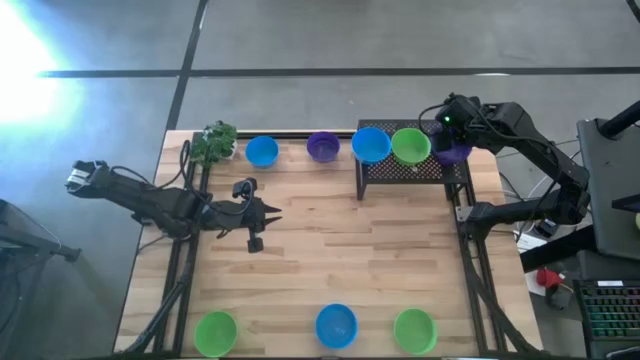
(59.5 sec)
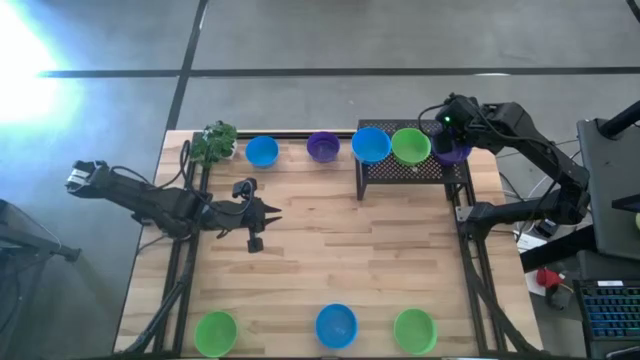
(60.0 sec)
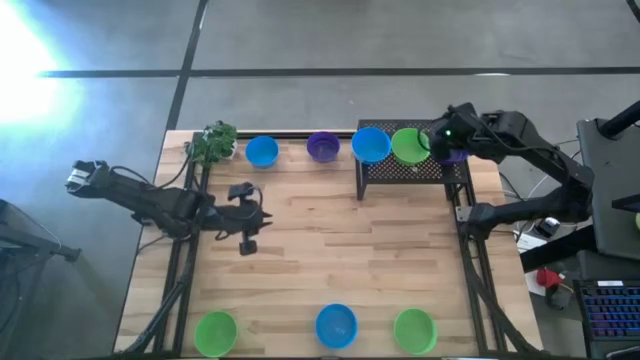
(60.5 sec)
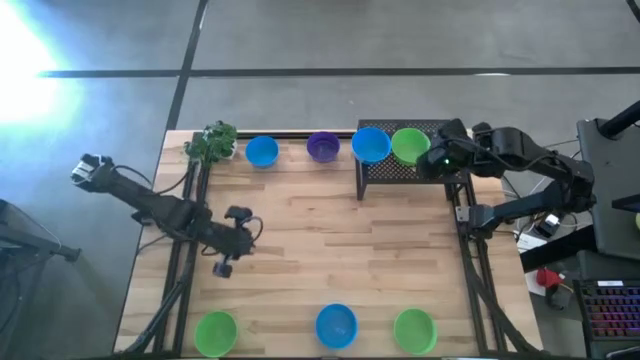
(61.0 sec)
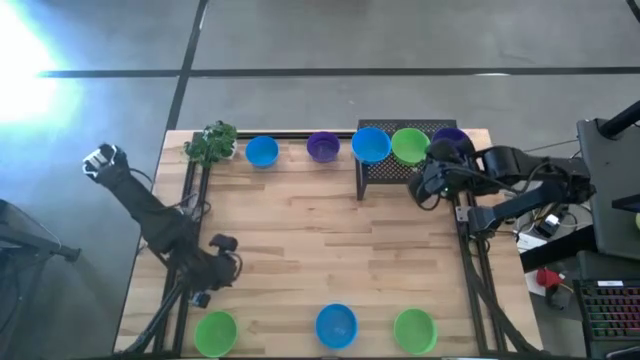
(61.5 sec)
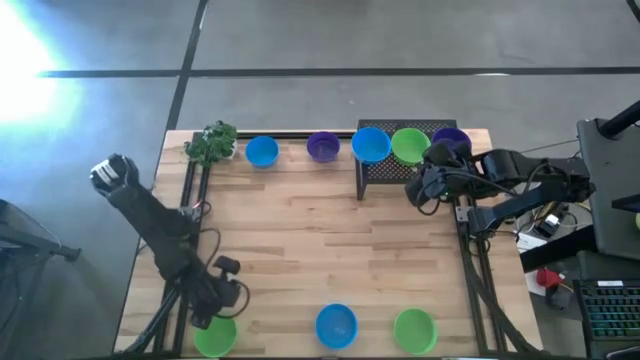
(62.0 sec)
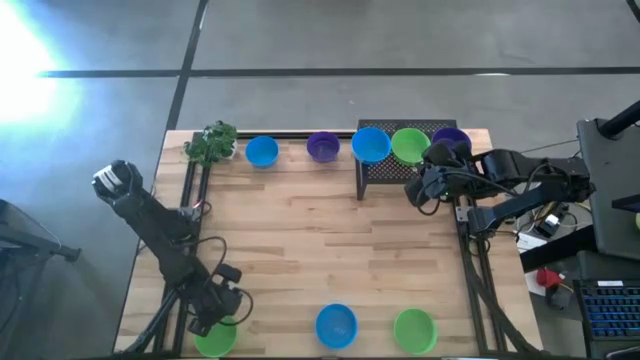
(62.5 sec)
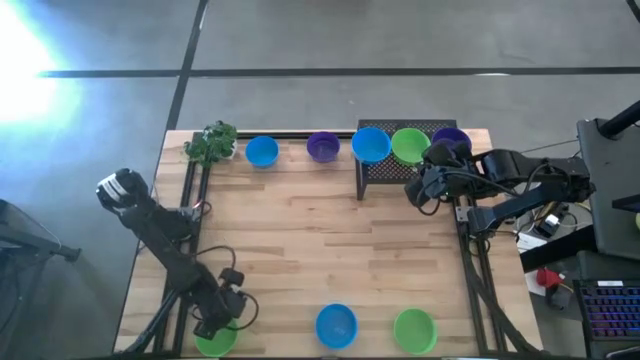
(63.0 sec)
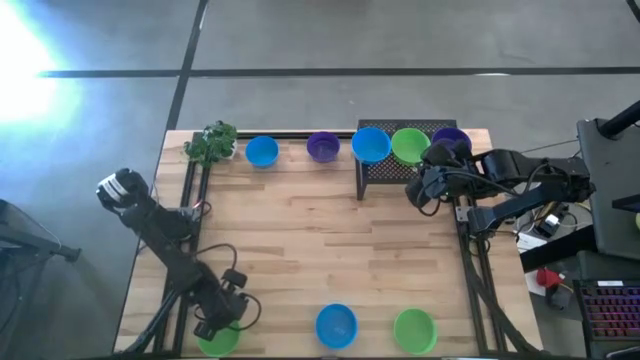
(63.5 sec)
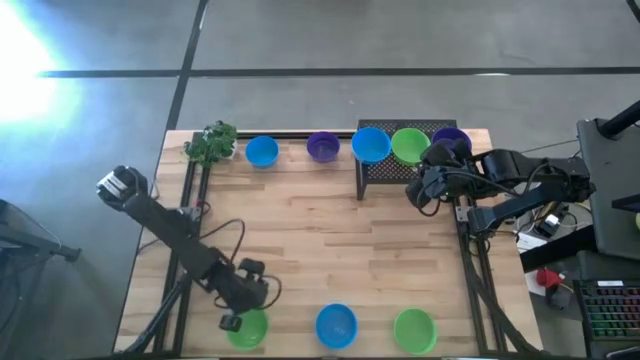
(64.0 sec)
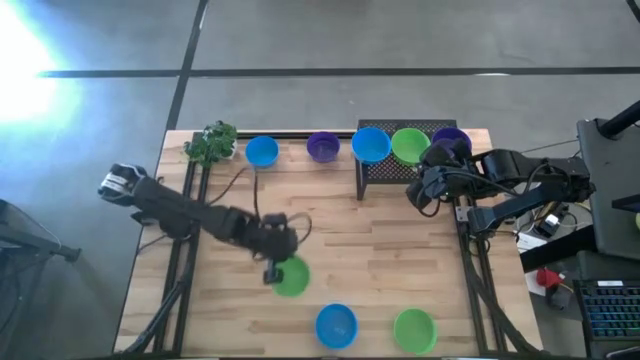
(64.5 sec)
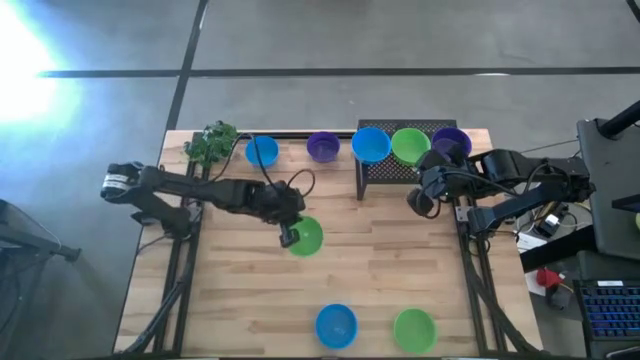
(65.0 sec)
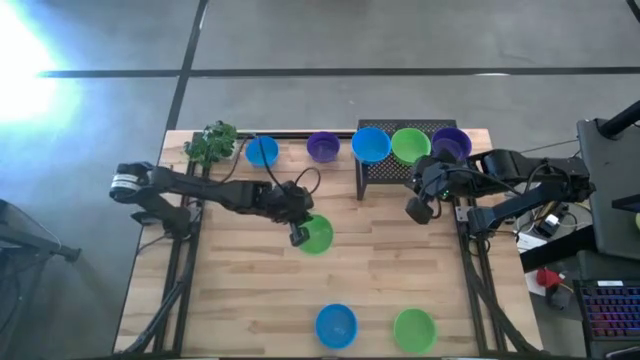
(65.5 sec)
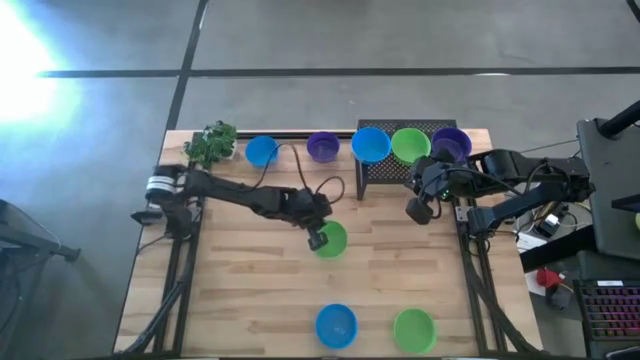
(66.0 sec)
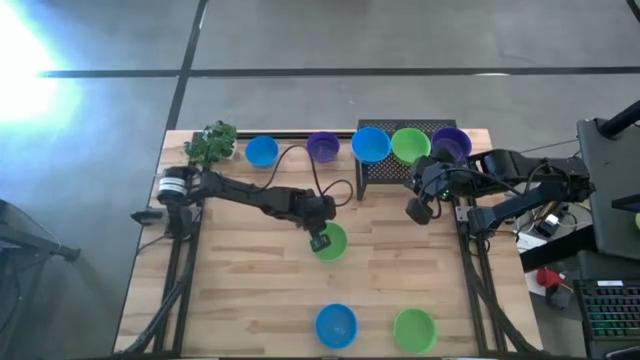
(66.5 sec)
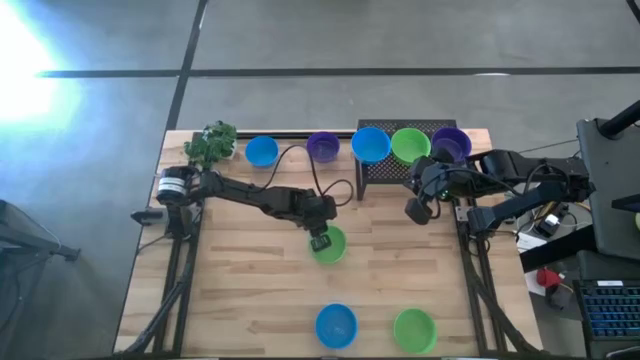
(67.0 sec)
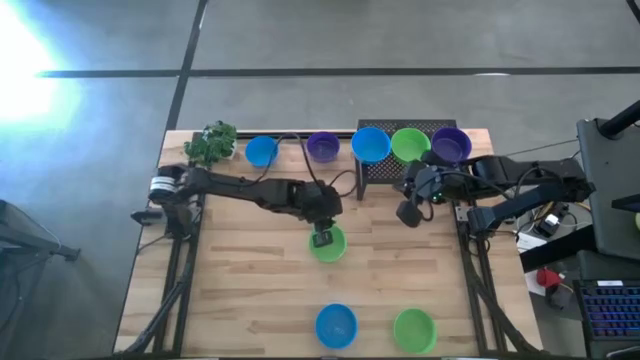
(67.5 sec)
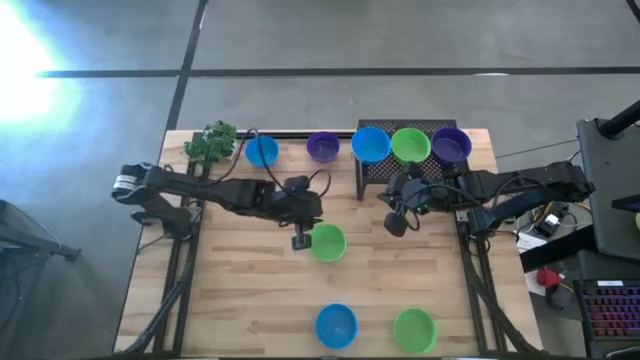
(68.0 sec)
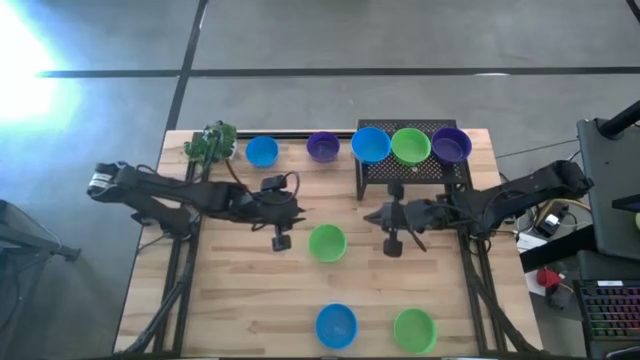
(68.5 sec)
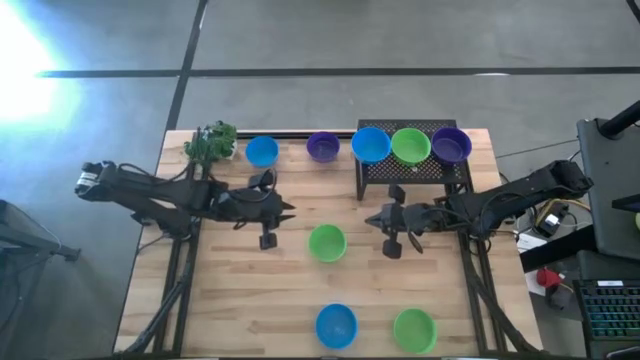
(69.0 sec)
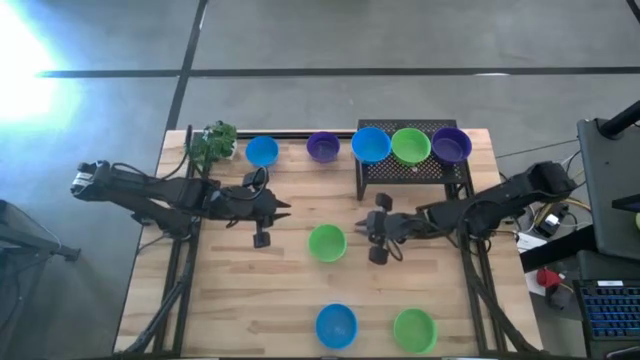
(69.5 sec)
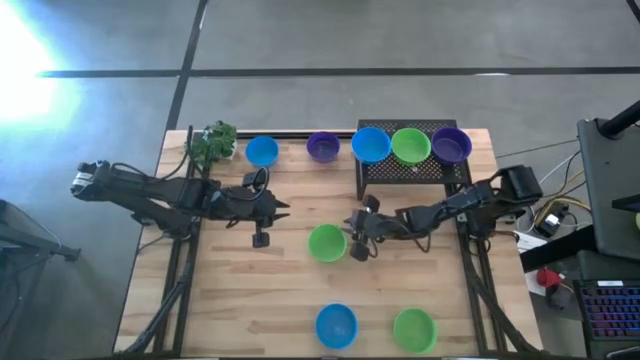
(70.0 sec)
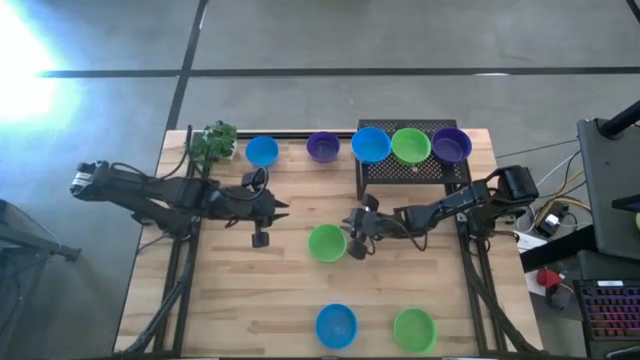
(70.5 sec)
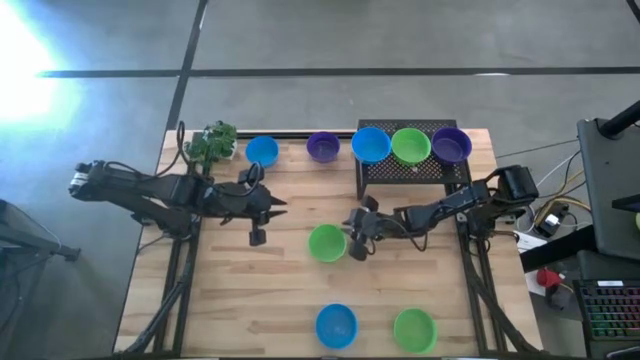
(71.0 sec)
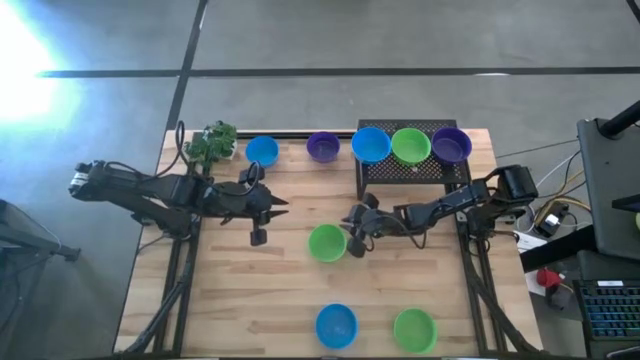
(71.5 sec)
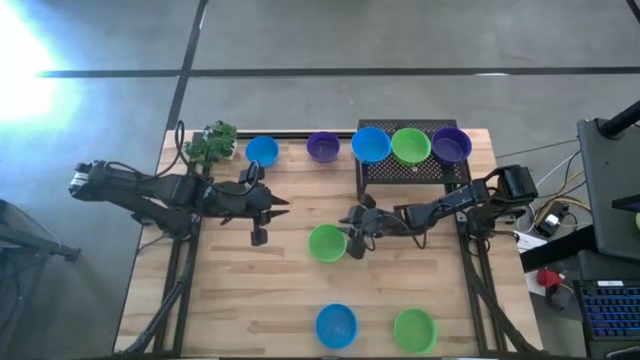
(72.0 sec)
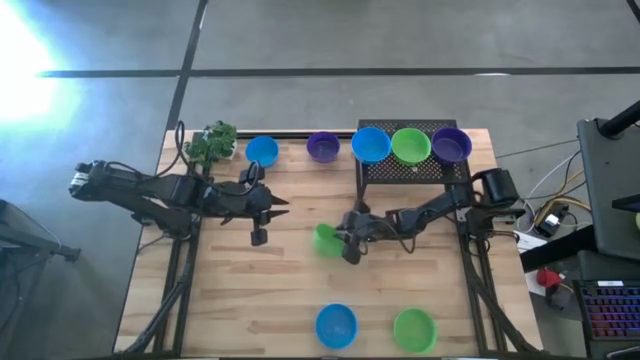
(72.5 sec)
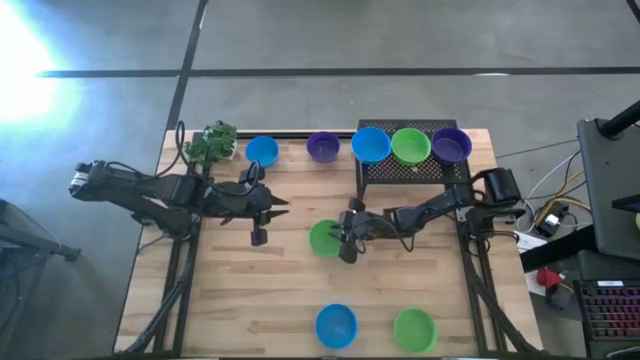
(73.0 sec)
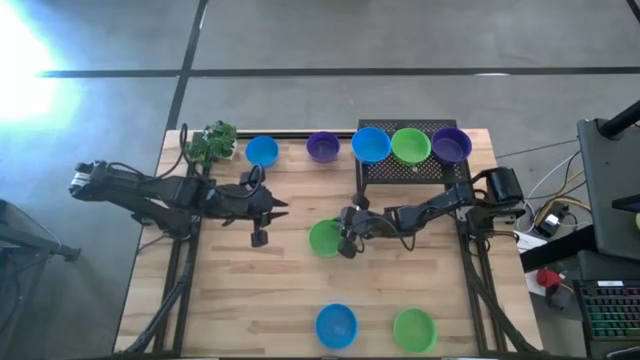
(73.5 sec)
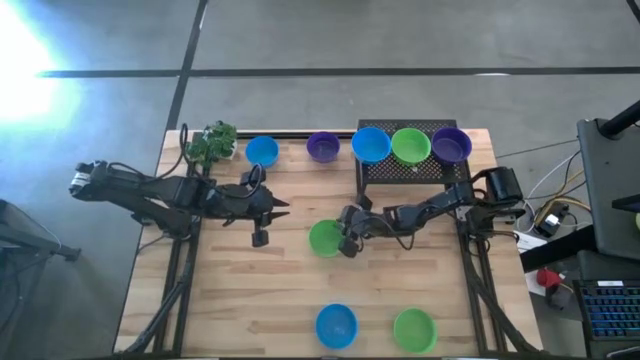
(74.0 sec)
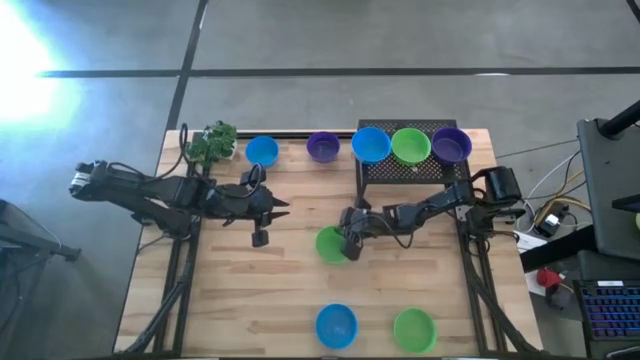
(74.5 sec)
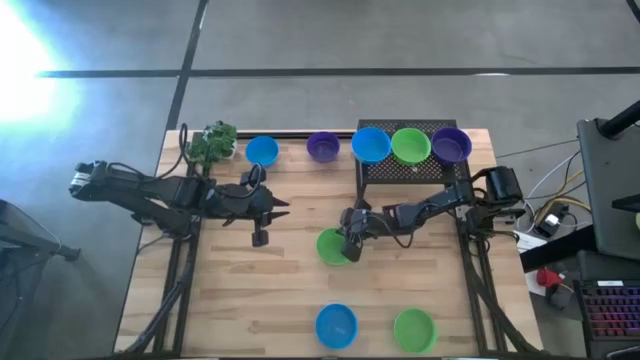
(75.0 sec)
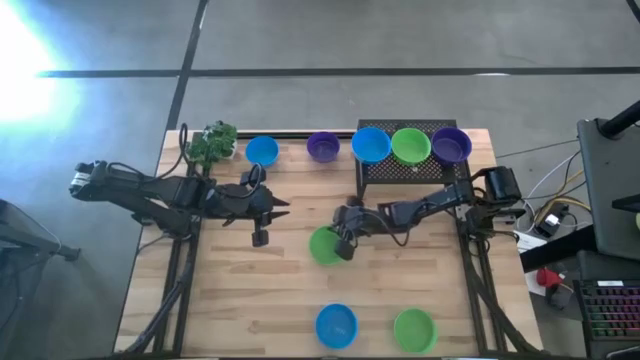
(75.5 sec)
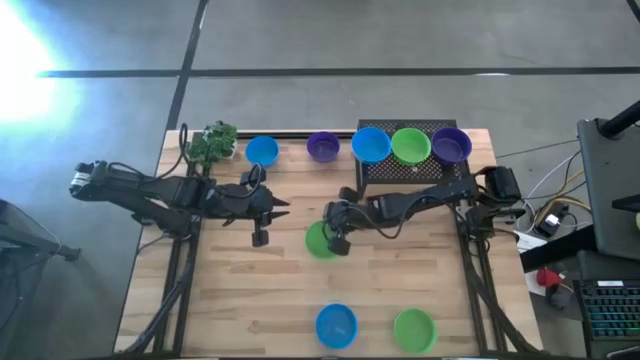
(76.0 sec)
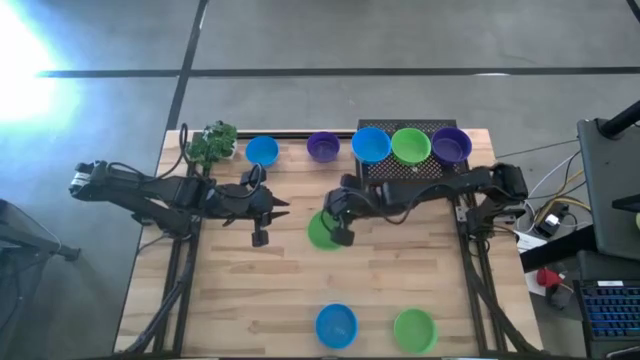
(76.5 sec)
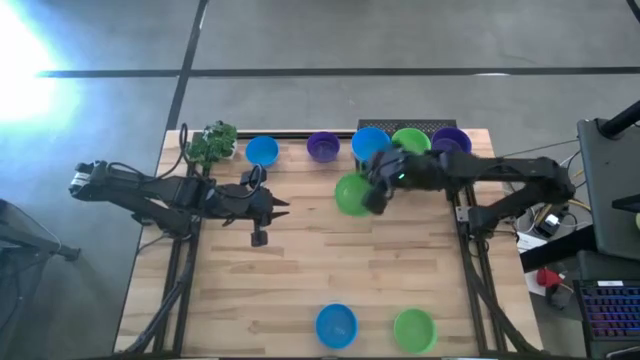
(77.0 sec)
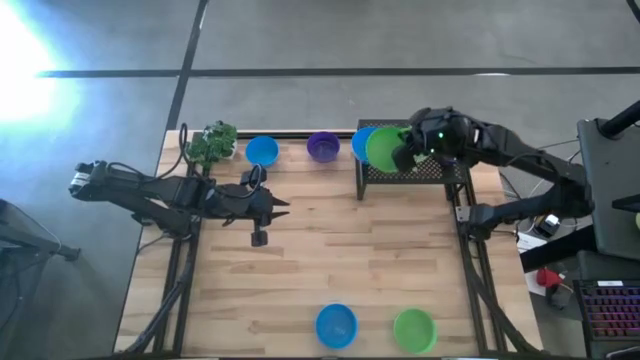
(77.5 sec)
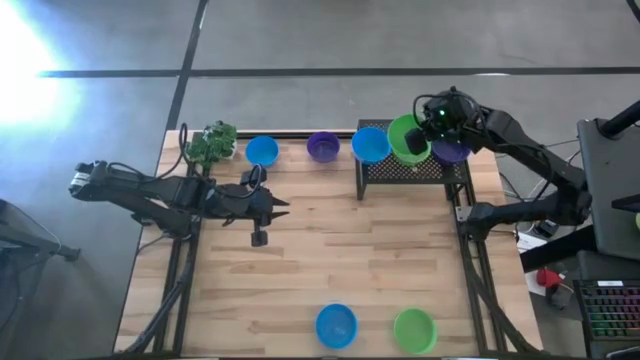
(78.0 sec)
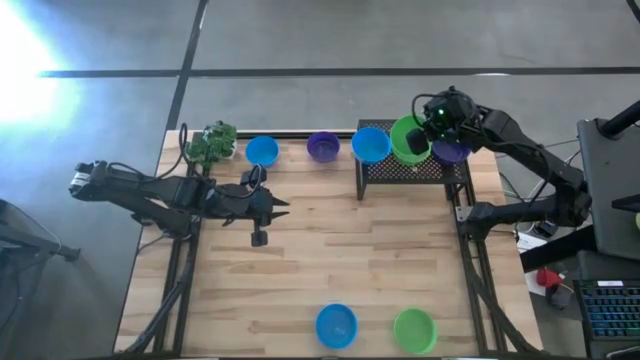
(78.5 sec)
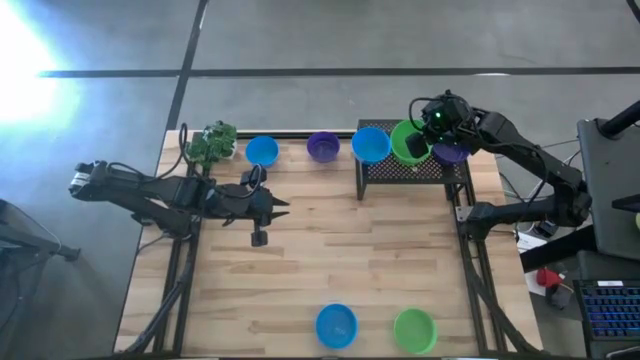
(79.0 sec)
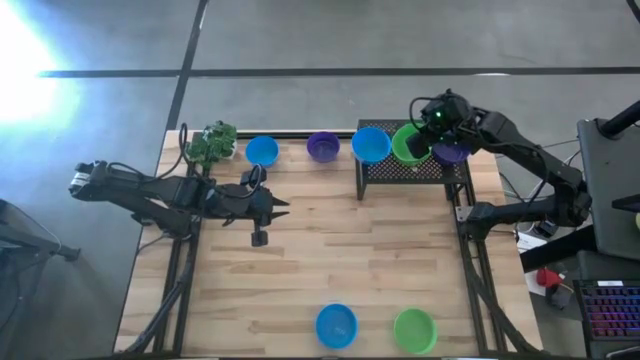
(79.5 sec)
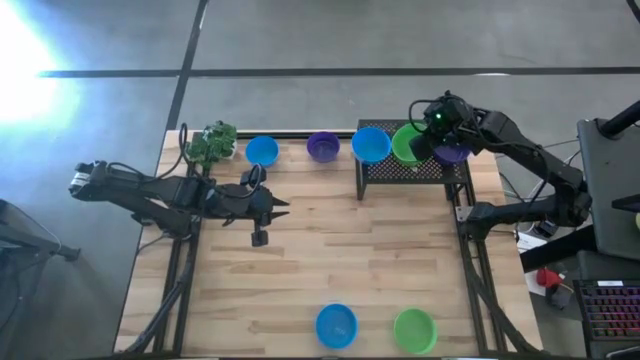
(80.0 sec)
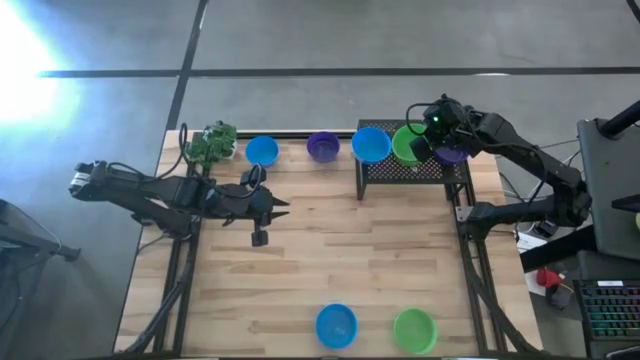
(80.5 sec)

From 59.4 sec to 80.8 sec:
Task: Pick & Place Mini bowls
Stack the left green bowl on the green bowl on the shelf
